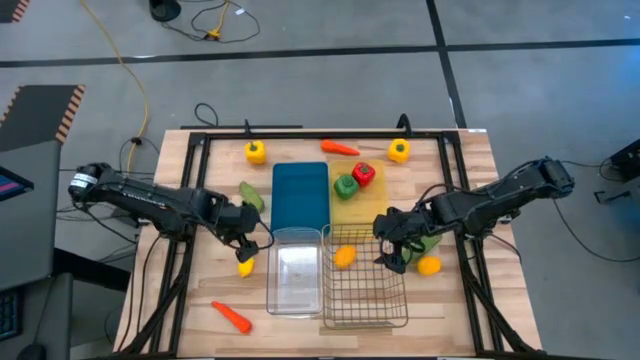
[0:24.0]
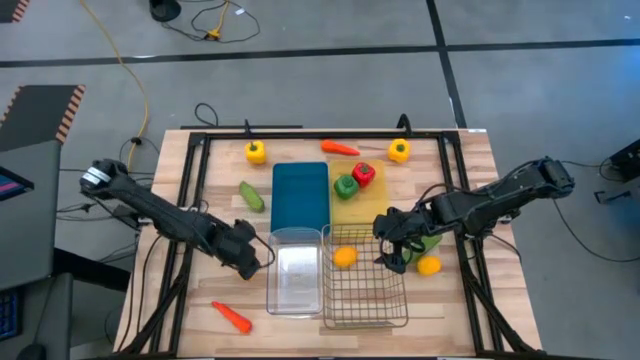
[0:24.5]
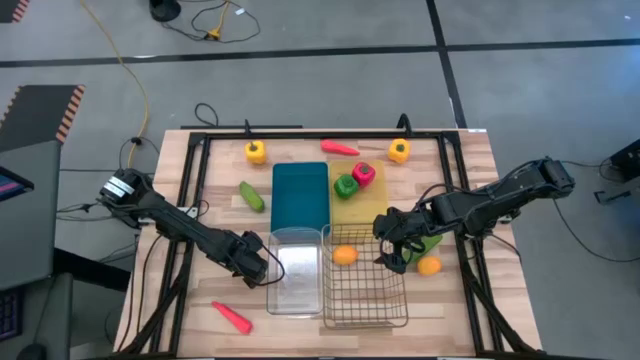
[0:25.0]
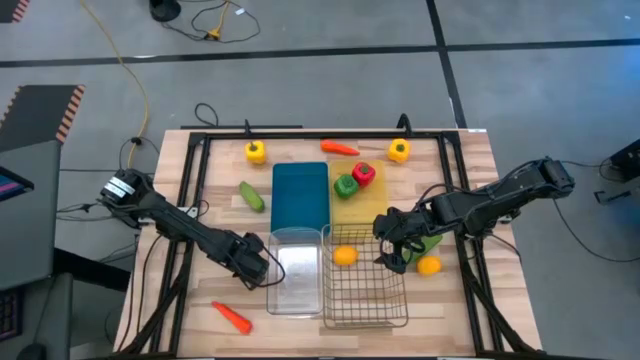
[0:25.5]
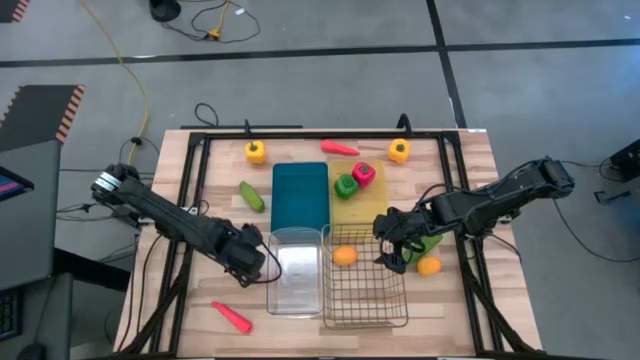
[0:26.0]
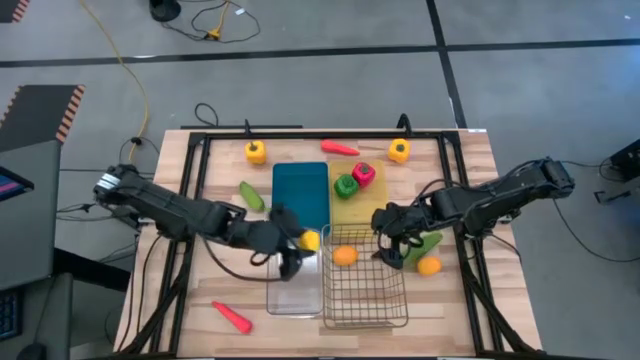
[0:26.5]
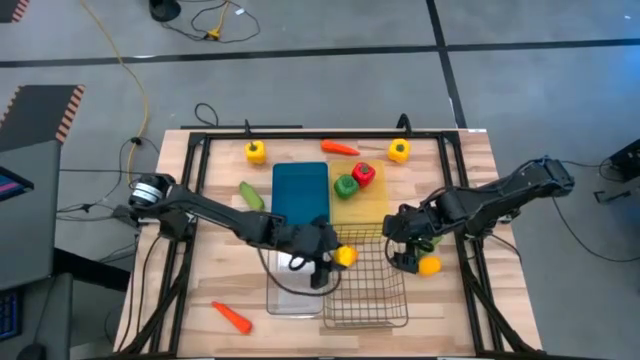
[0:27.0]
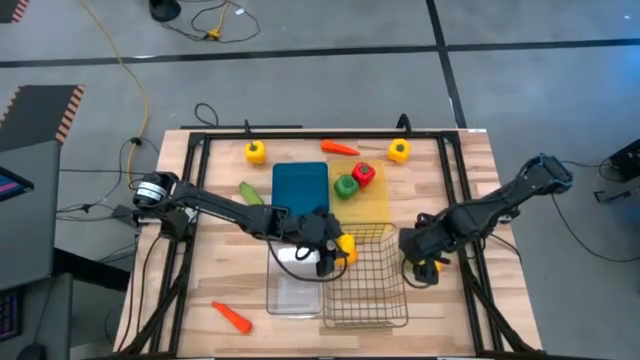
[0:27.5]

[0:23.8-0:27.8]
Task: Sort produce into baskets
Put the left lemon into the wire basket

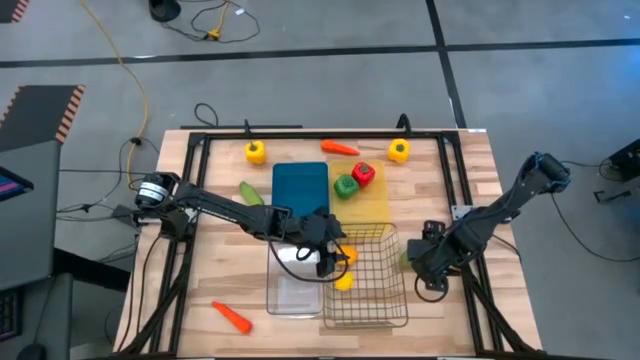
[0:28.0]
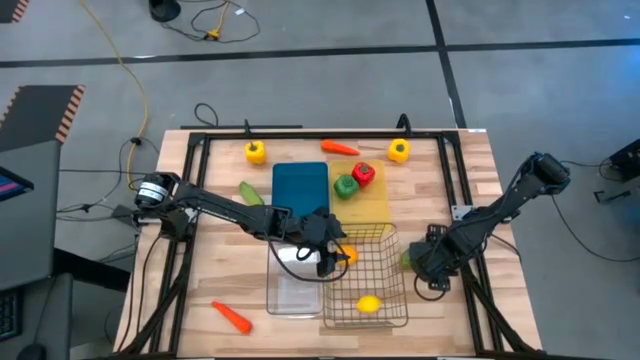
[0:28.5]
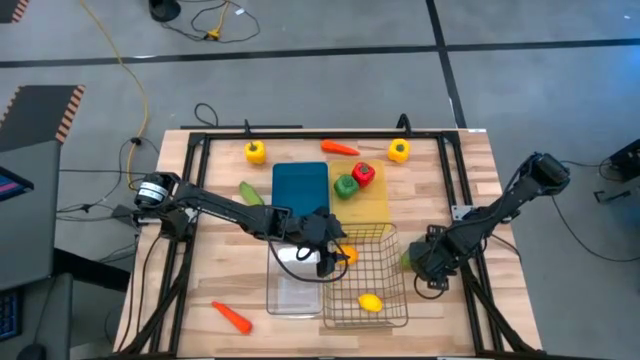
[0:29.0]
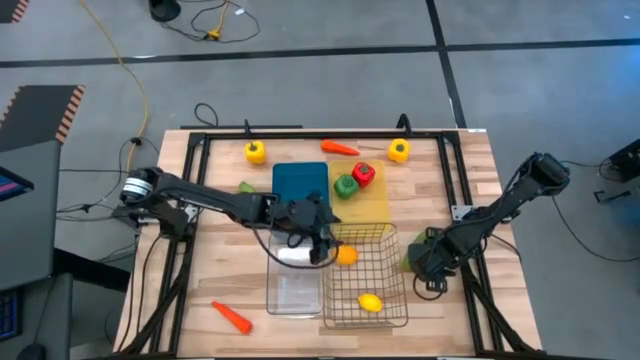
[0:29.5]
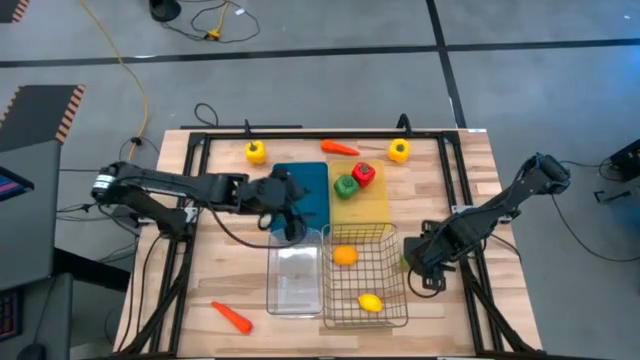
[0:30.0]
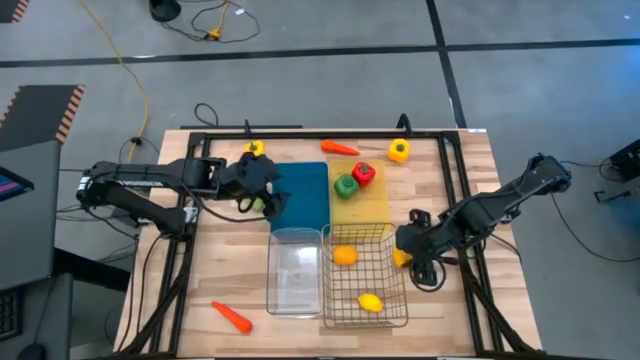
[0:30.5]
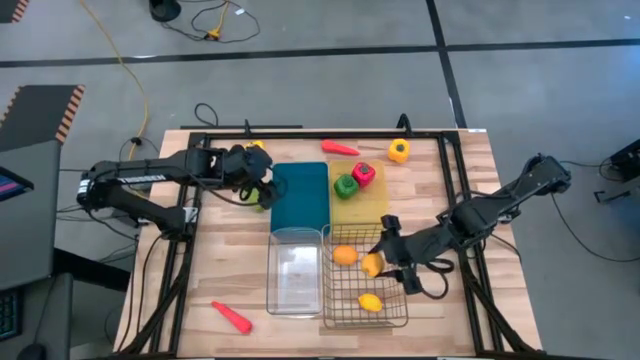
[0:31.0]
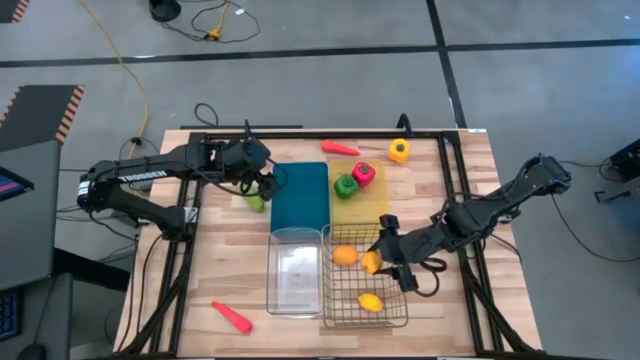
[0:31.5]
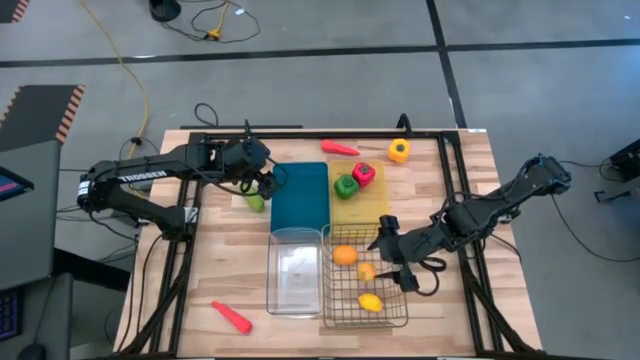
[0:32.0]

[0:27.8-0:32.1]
Put the lemon into the wire basket

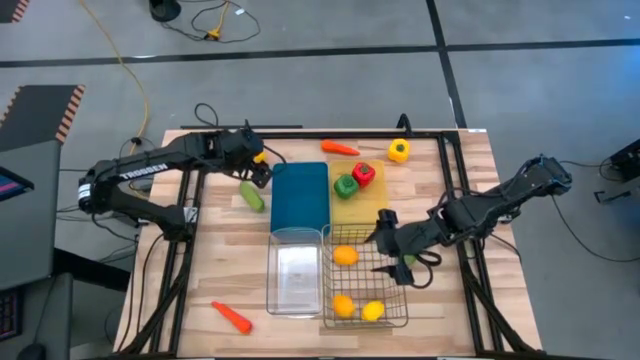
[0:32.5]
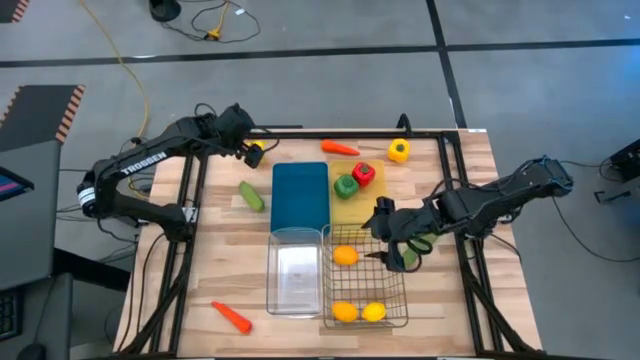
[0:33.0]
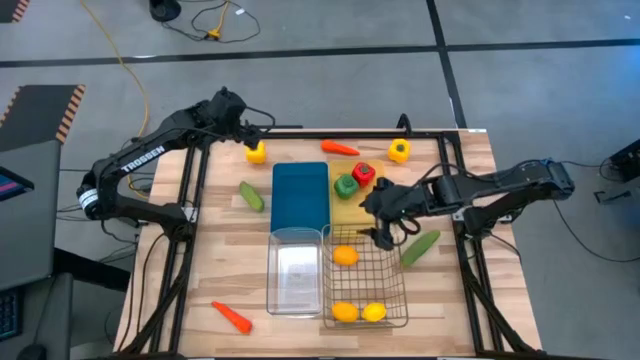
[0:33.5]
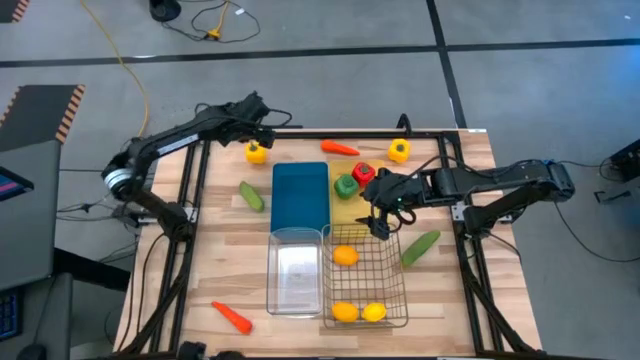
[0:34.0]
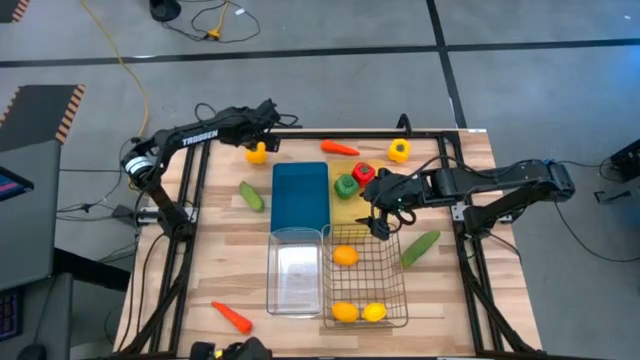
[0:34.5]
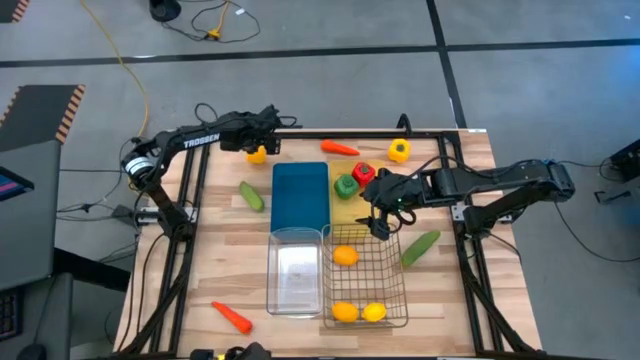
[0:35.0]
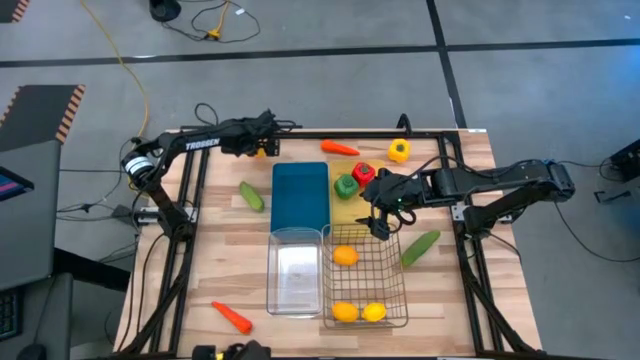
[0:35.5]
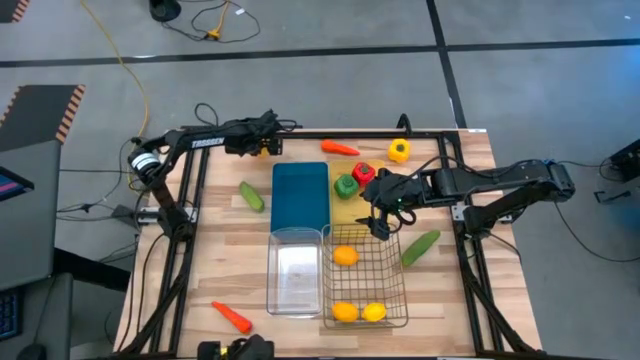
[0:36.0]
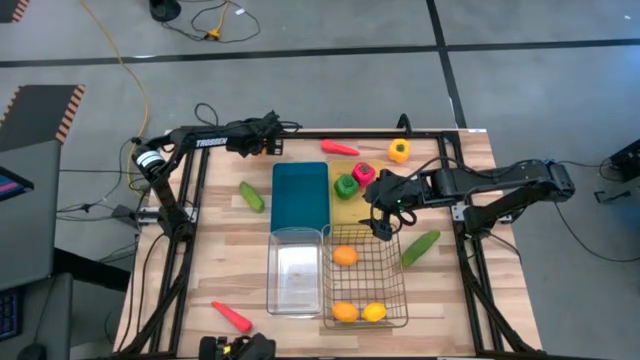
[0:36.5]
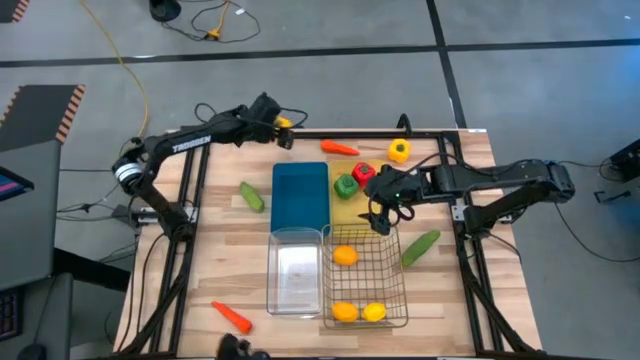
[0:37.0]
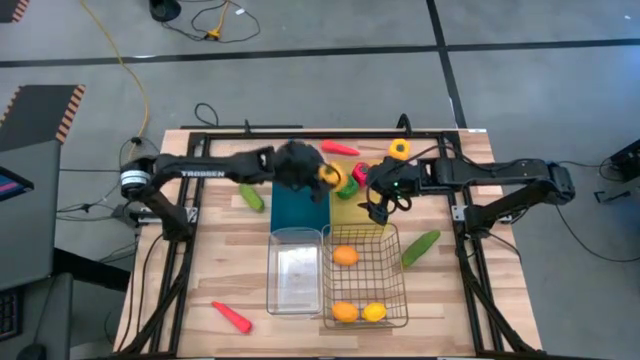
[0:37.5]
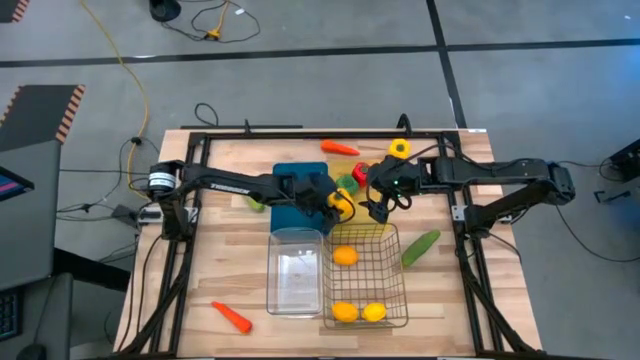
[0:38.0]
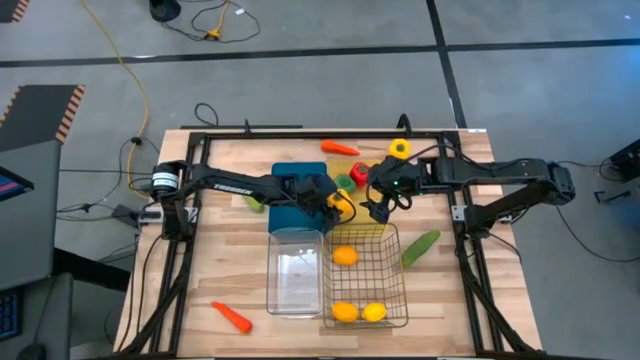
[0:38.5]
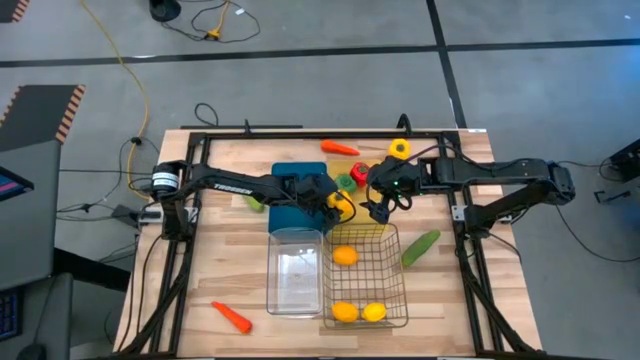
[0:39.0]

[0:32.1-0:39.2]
Put the left yellow bell pepper into the yellow basket

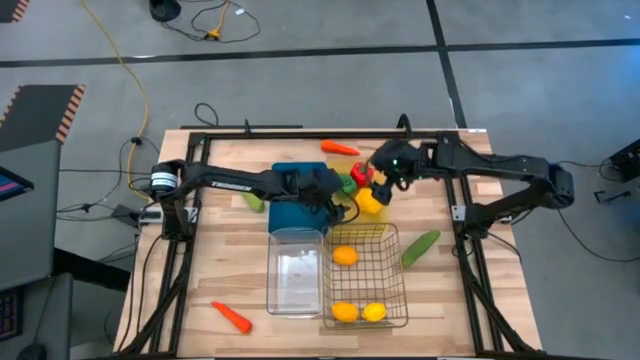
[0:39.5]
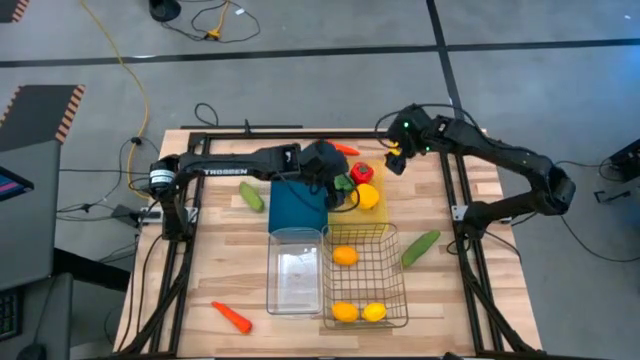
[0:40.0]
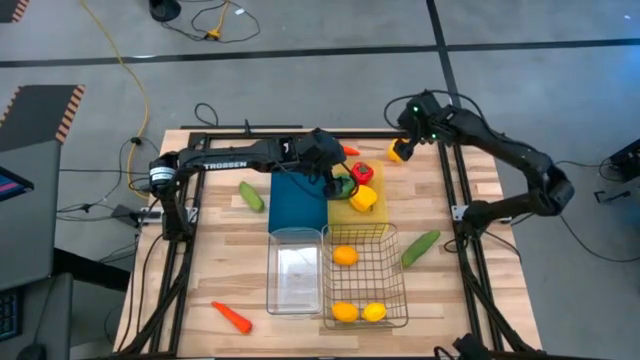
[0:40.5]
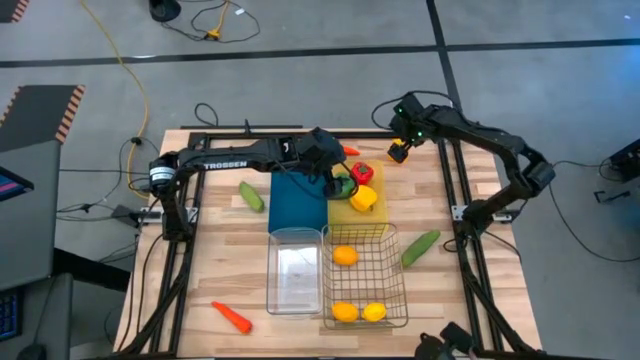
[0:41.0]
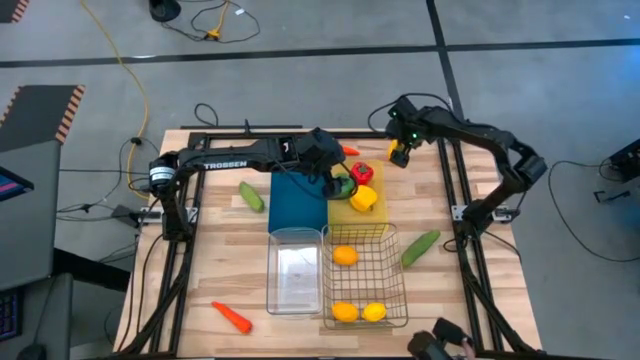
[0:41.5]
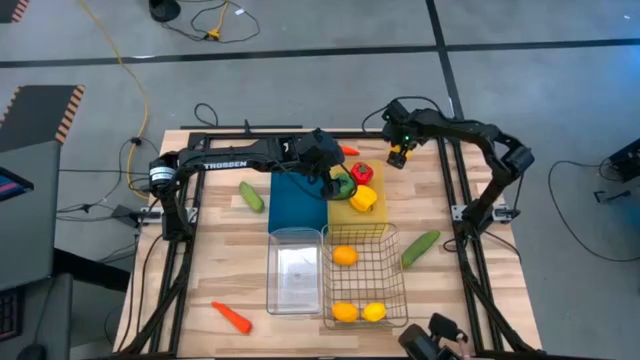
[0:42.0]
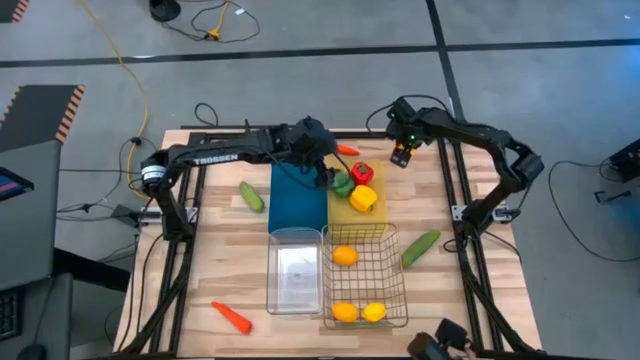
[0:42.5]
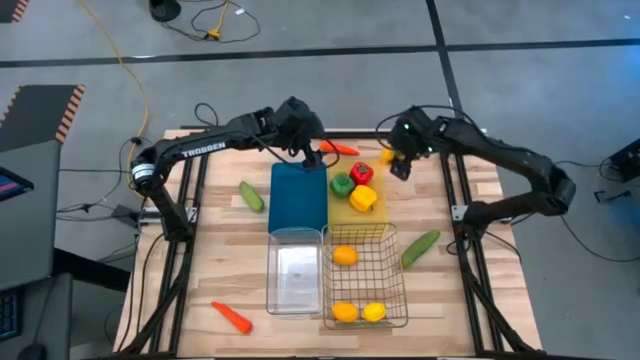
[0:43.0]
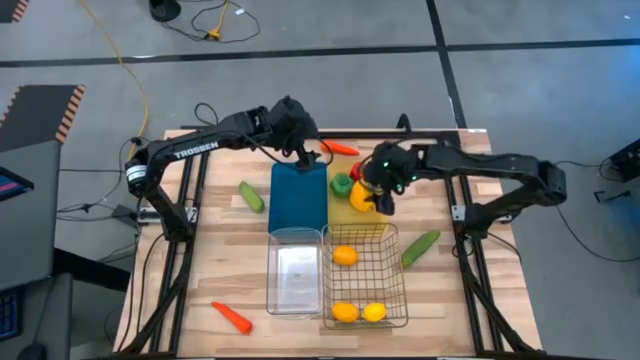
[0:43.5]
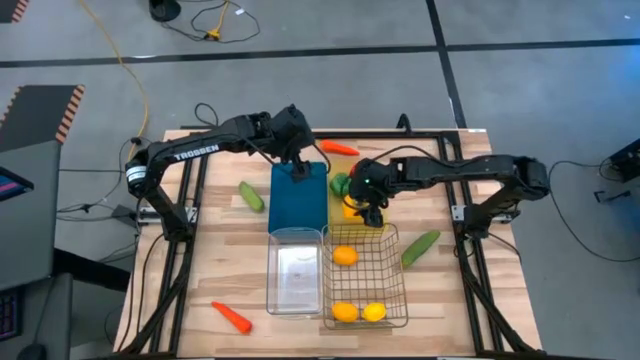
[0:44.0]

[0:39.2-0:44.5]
Put the yellow bell pepper into the yellow basket
